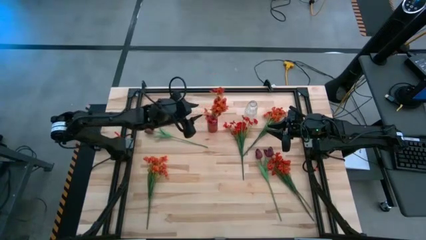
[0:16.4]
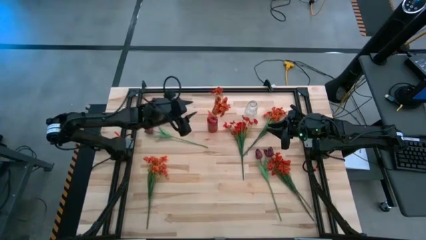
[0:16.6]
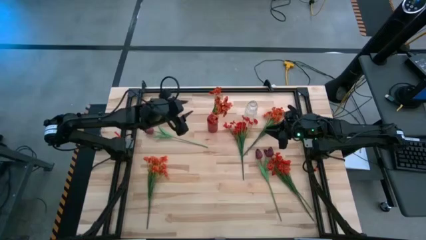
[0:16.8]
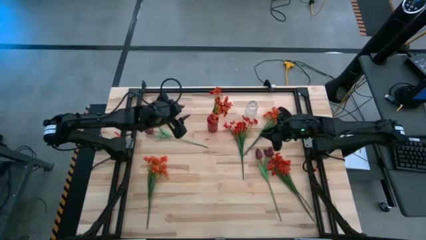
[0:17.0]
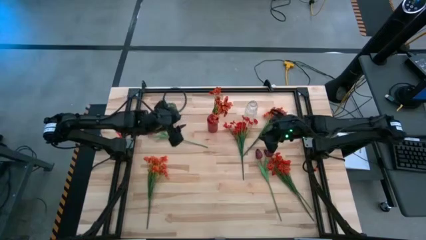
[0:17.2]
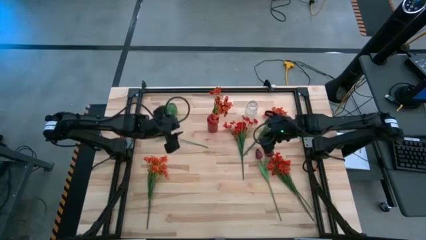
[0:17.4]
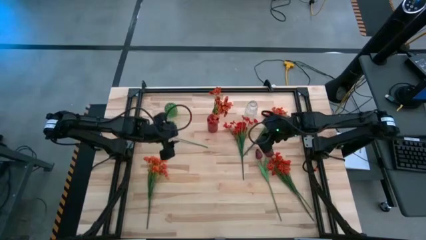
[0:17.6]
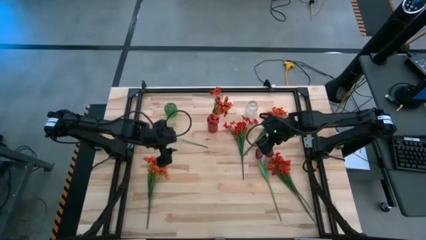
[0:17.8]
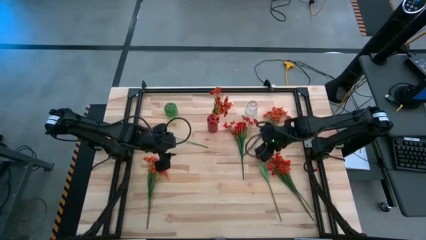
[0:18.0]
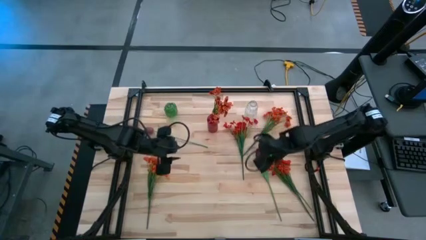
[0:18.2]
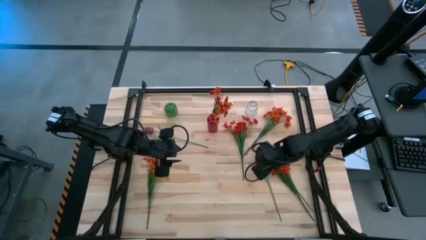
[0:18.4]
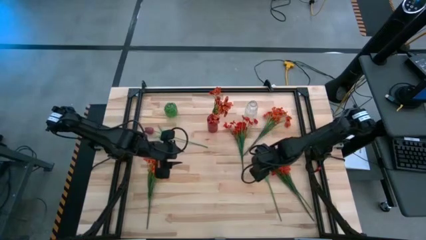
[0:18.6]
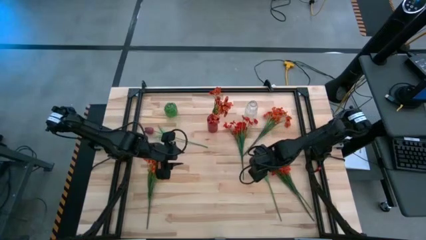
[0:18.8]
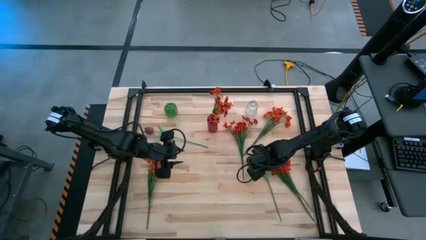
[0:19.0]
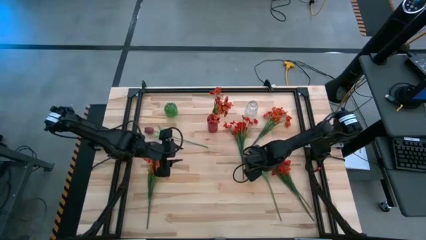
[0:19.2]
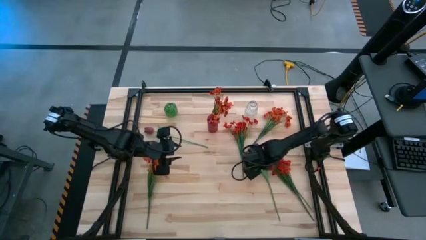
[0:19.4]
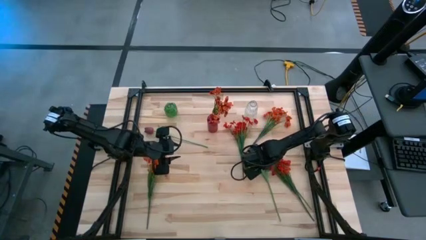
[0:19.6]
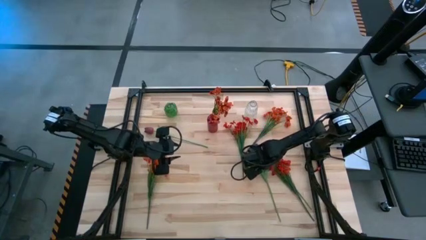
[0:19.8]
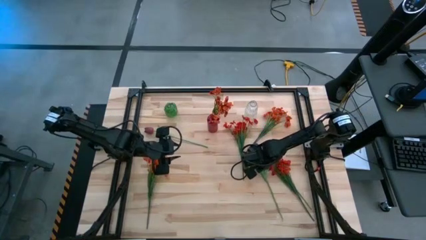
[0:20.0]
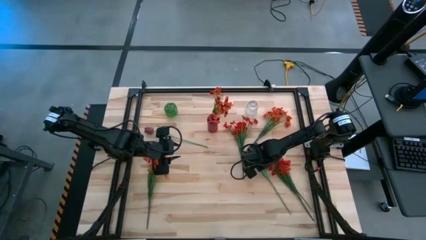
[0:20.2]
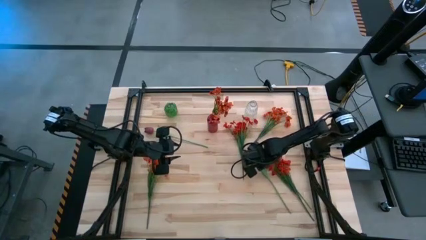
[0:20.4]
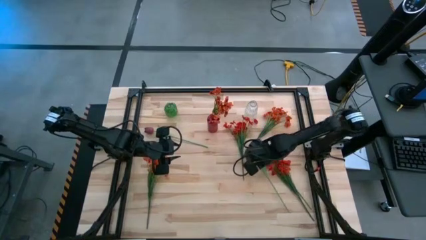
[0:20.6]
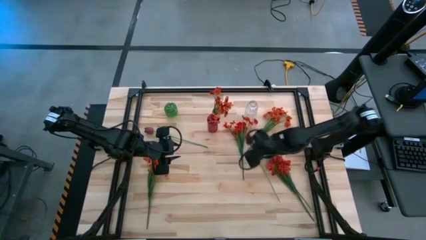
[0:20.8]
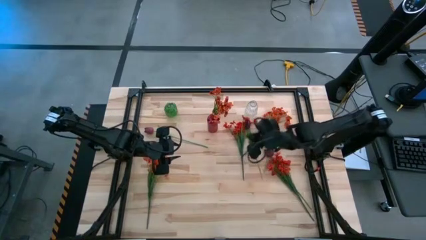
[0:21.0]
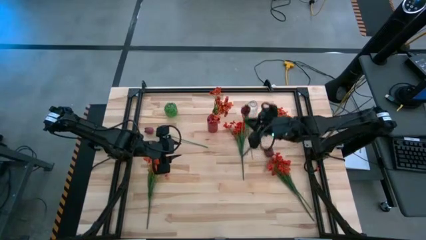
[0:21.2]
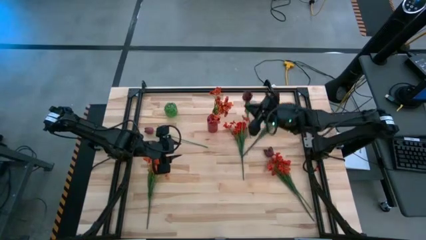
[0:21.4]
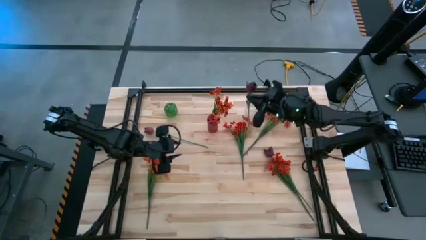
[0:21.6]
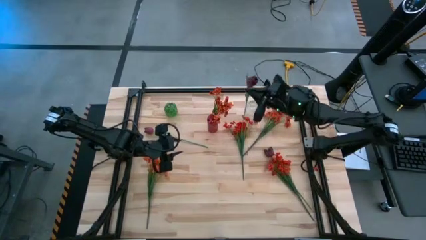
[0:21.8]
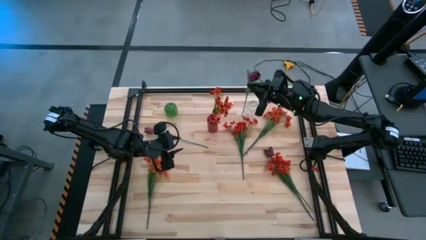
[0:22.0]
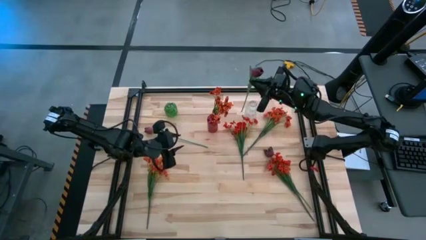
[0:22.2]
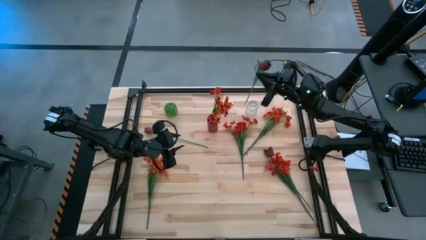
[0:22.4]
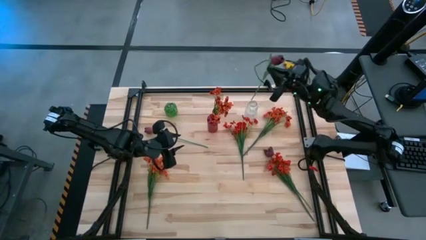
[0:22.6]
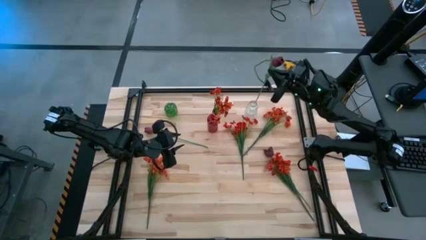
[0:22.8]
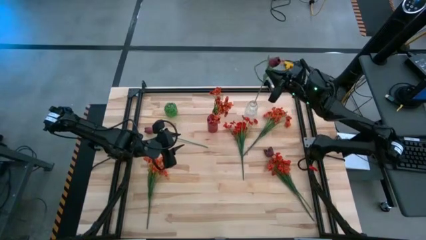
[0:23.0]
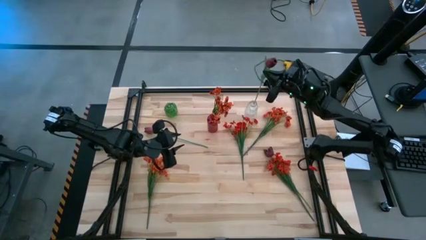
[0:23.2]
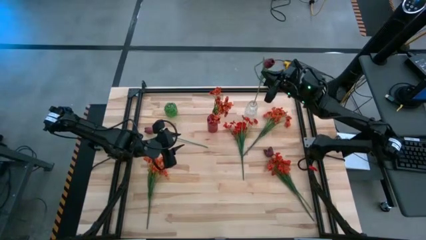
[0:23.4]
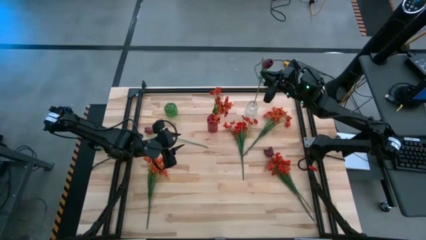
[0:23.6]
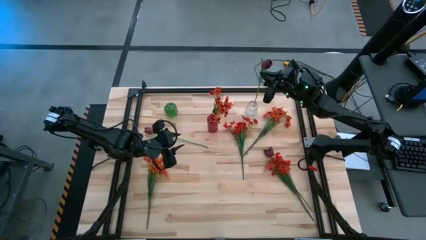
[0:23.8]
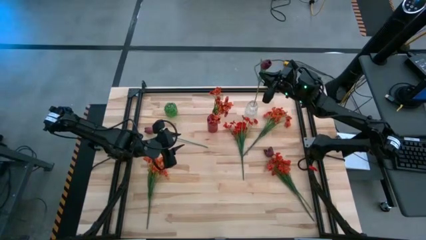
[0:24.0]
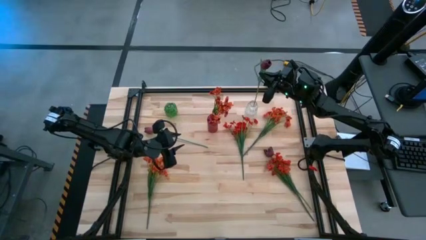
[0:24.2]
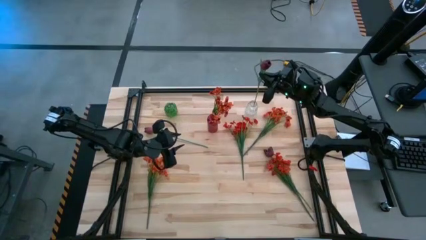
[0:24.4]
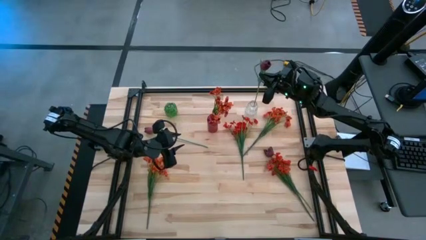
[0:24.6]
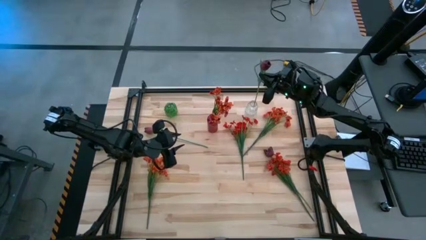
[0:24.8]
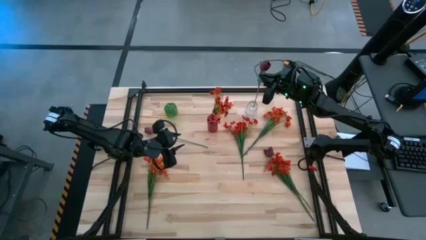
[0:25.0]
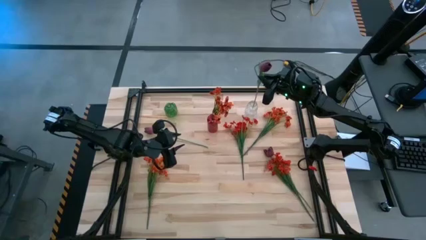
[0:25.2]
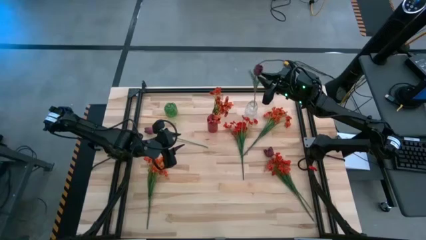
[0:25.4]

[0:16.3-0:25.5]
Task: Sort flowers into vase by color
Put the bottom left red flower into the transparent vase

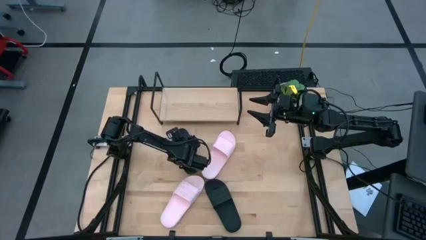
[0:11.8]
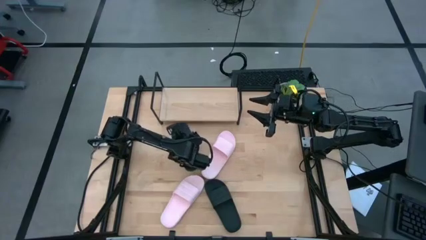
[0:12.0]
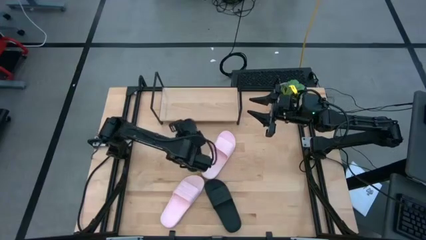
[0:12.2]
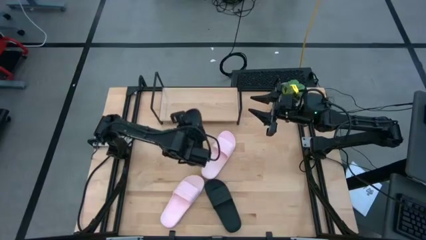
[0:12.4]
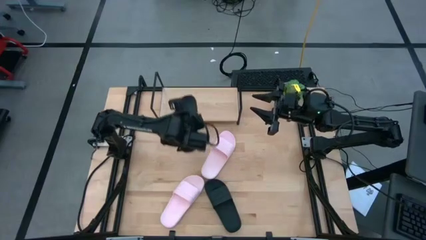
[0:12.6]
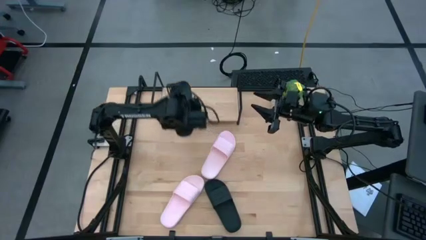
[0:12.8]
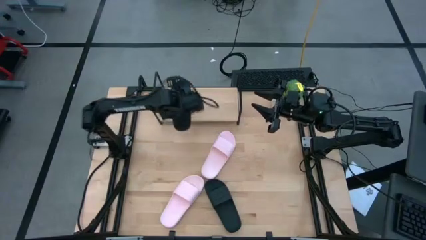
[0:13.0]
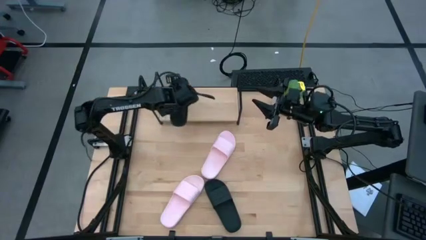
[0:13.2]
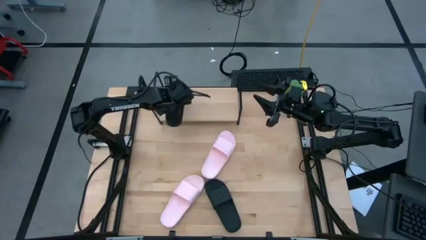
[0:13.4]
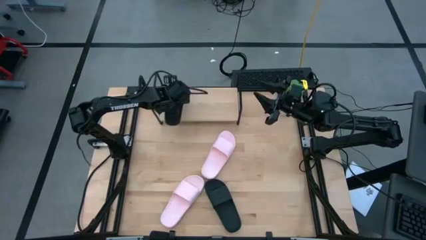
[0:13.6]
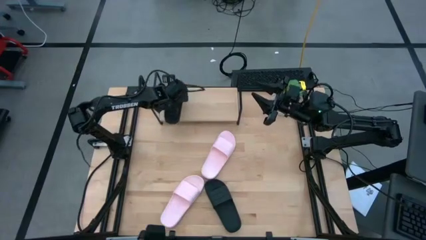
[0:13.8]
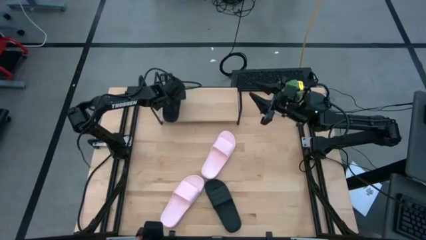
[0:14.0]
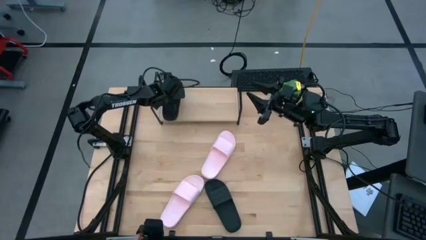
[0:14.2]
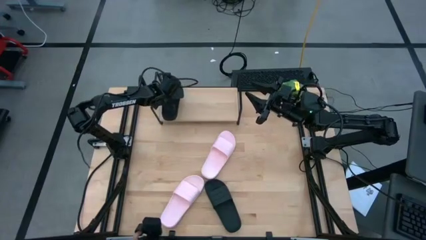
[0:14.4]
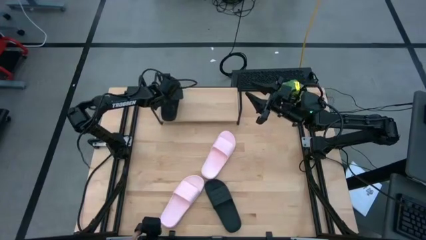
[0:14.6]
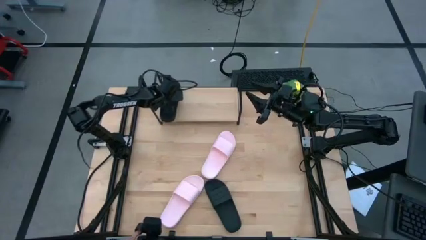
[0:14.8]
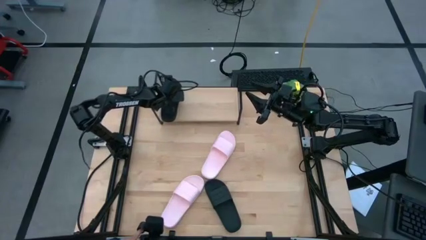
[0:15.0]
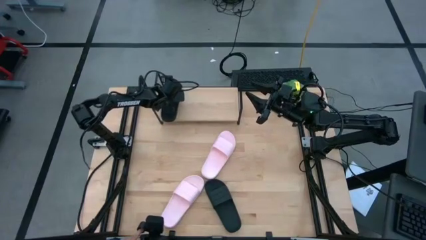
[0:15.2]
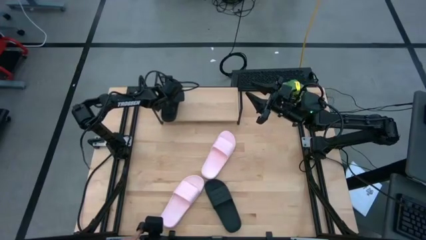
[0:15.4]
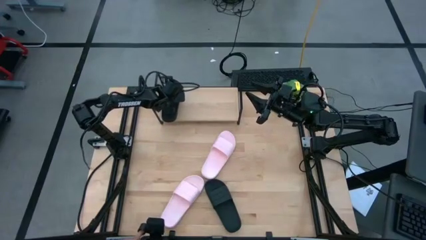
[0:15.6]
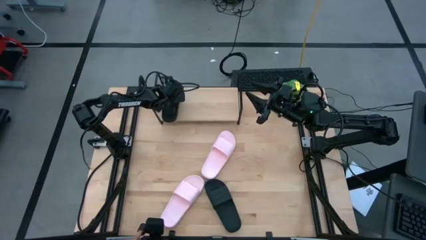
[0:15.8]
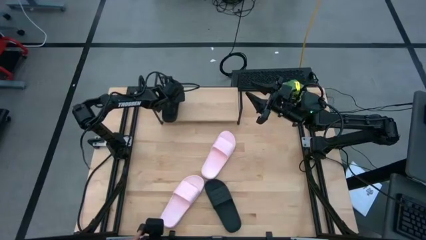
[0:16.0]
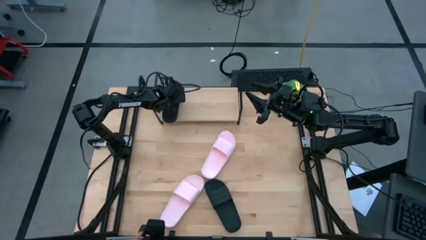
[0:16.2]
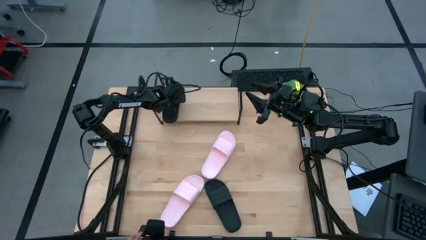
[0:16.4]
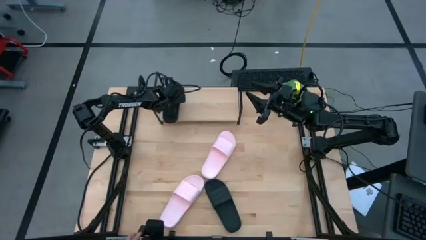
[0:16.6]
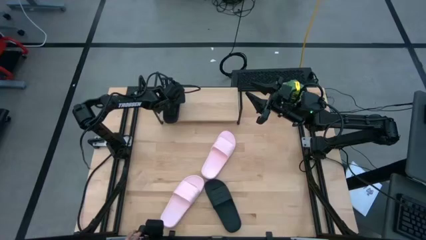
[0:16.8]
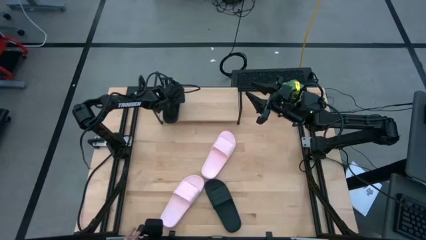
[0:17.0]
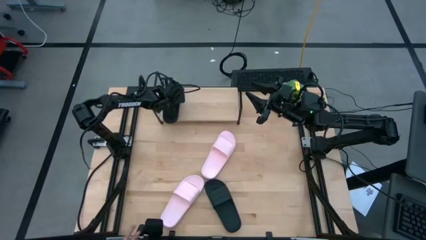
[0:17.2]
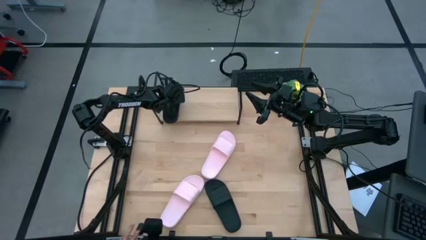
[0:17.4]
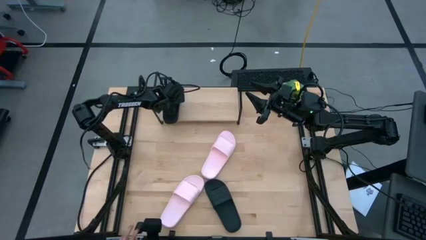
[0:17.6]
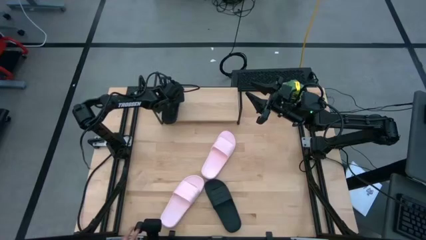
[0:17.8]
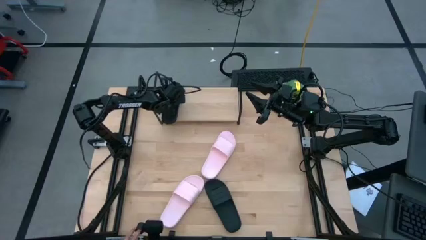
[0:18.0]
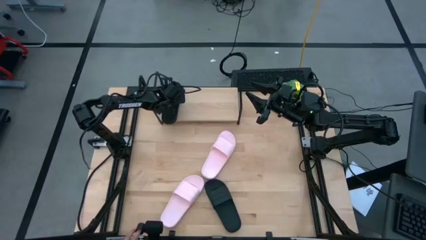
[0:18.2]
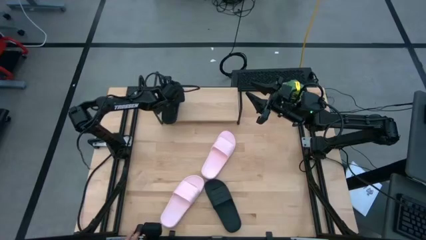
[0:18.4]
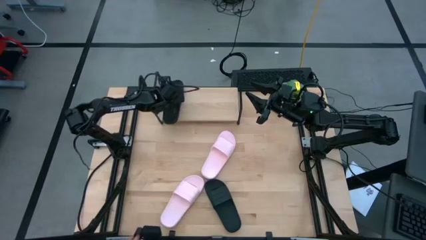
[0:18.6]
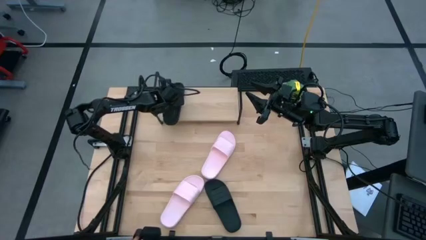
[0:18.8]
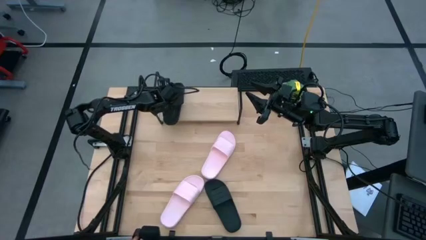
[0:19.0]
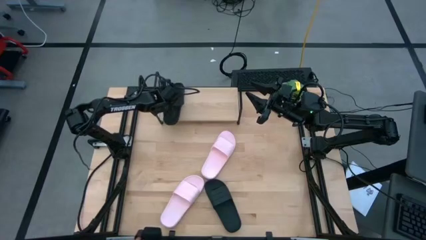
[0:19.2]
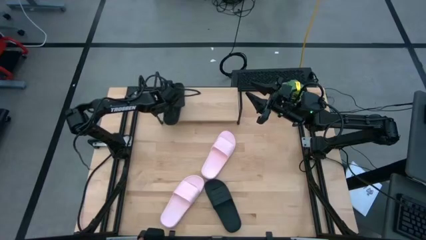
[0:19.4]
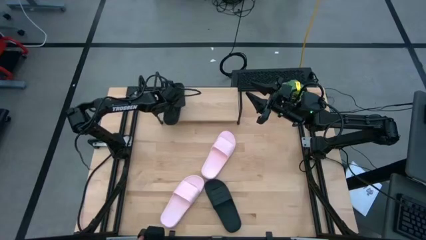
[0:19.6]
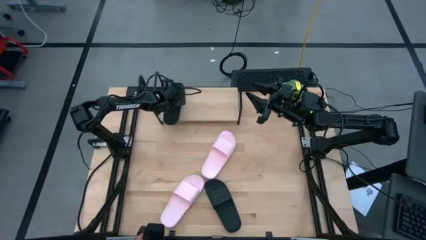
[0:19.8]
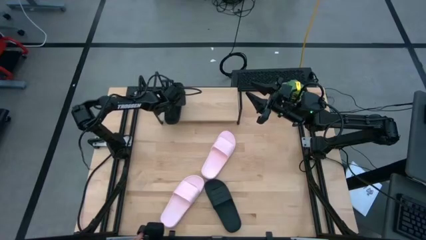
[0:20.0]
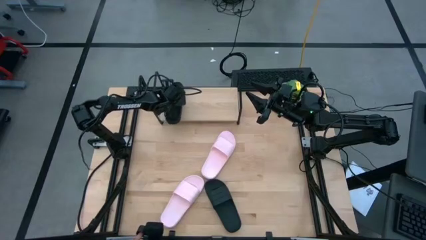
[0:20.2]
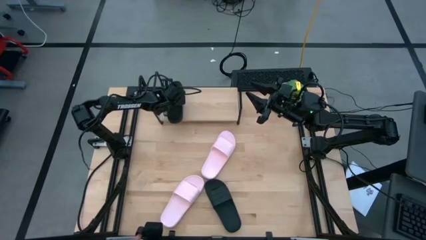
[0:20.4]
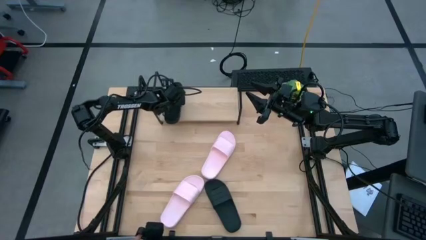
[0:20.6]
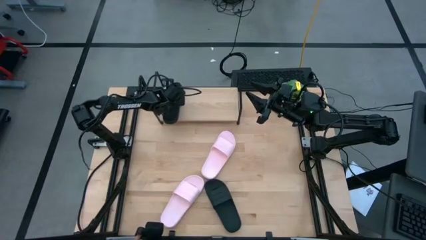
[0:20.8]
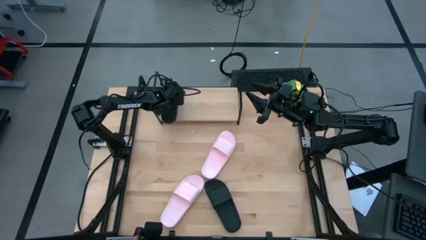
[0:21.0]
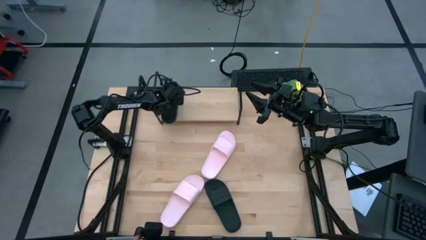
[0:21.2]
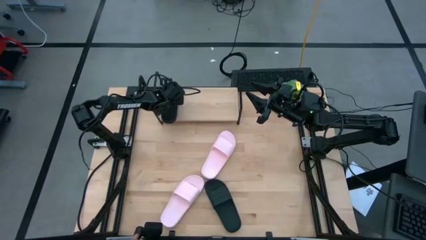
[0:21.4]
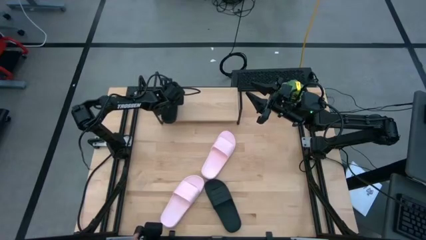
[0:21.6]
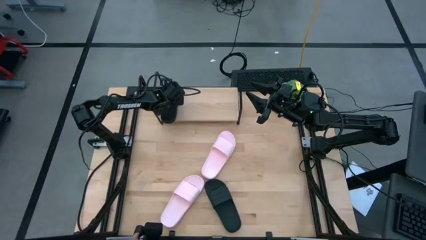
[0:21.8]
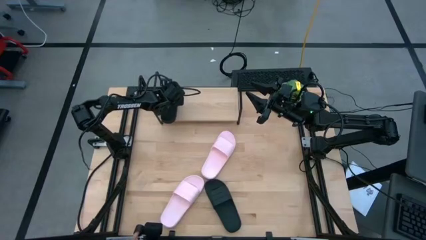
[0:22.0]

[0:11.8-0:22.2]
Task: Pick and place slides into the shelf
Put the top black slipper on the shelf
